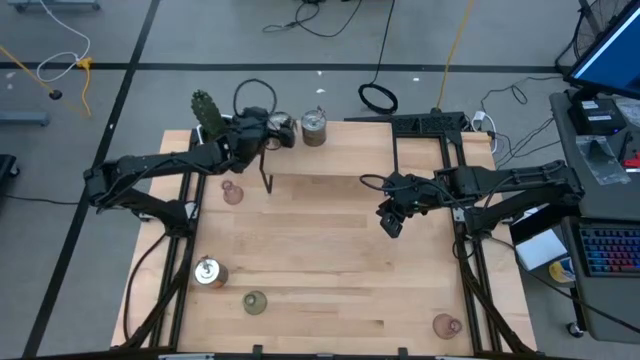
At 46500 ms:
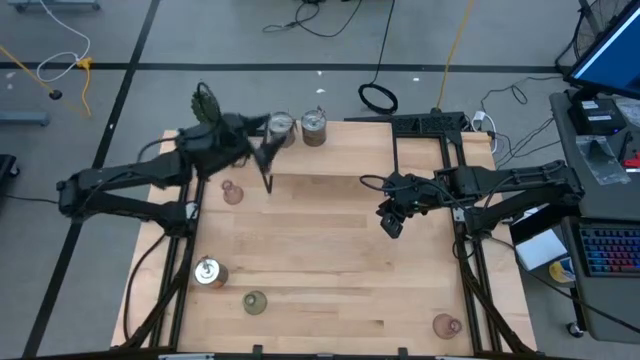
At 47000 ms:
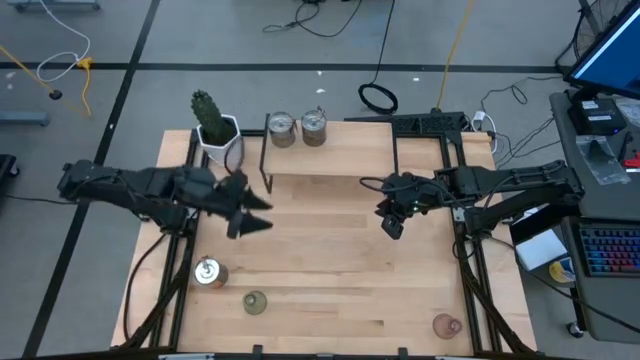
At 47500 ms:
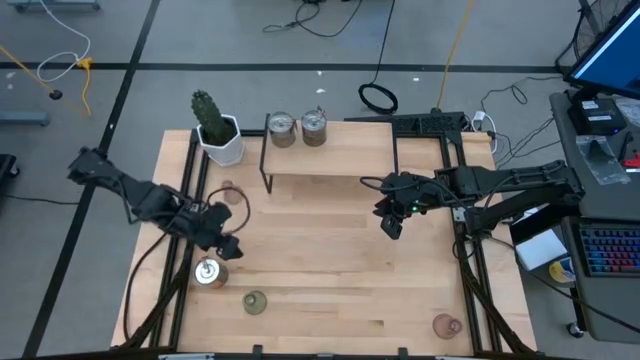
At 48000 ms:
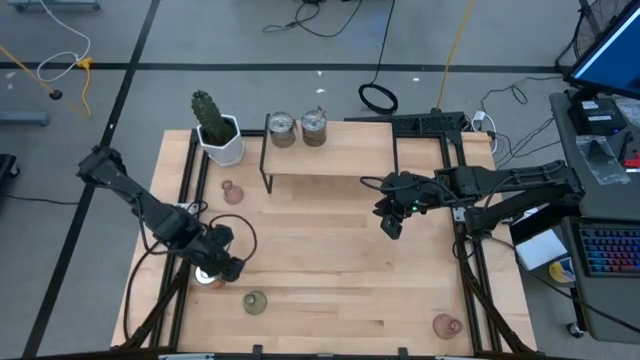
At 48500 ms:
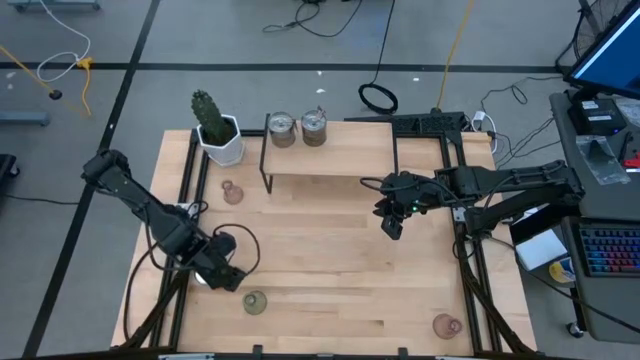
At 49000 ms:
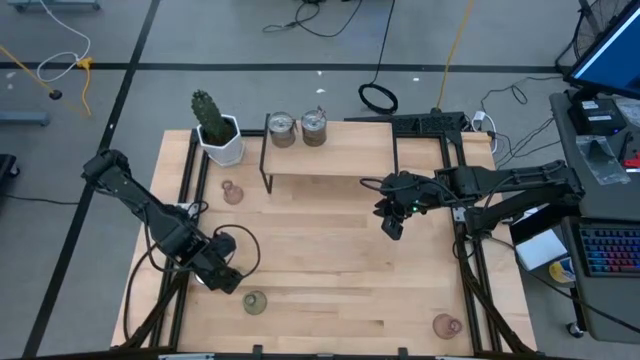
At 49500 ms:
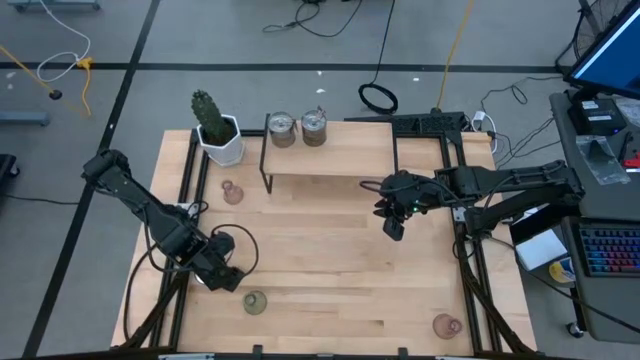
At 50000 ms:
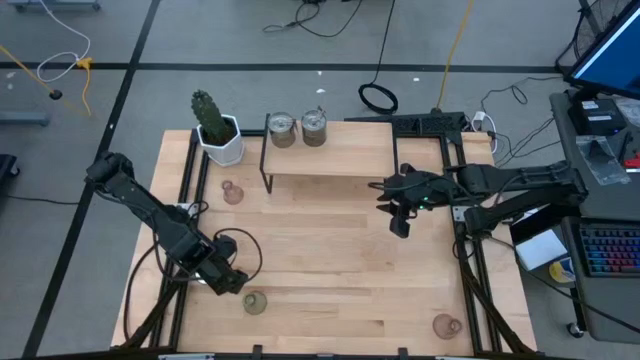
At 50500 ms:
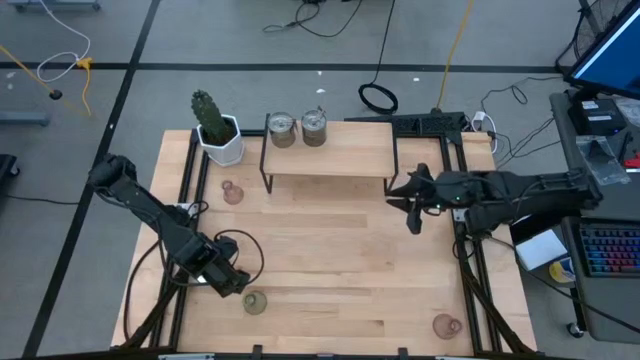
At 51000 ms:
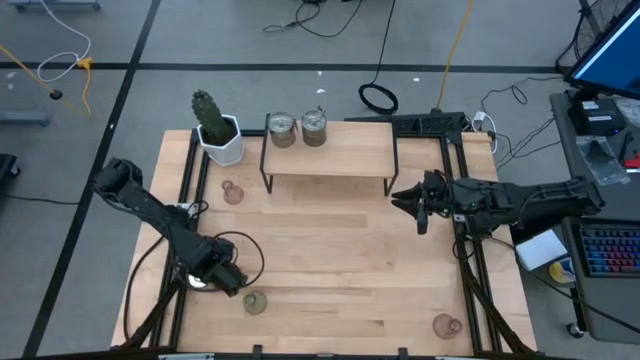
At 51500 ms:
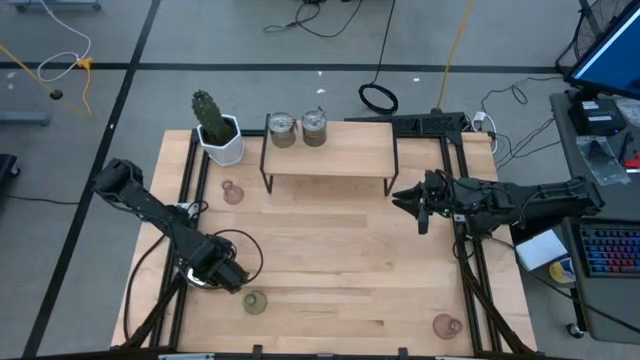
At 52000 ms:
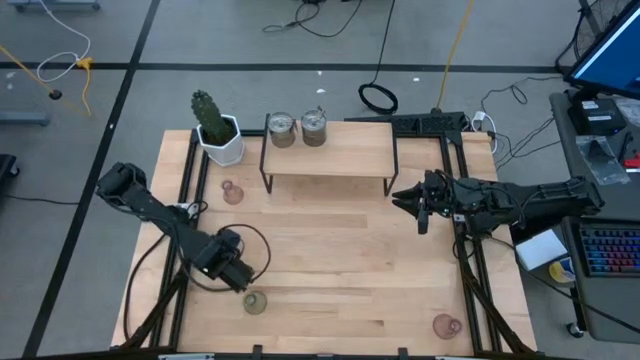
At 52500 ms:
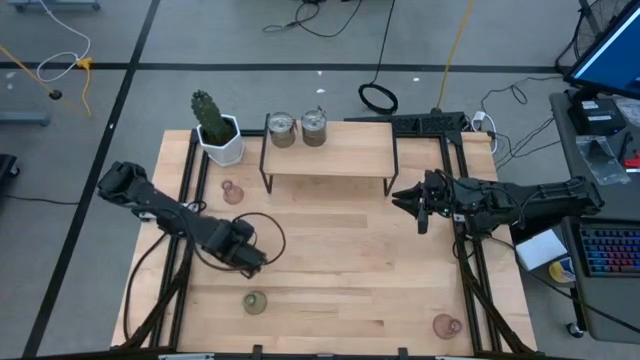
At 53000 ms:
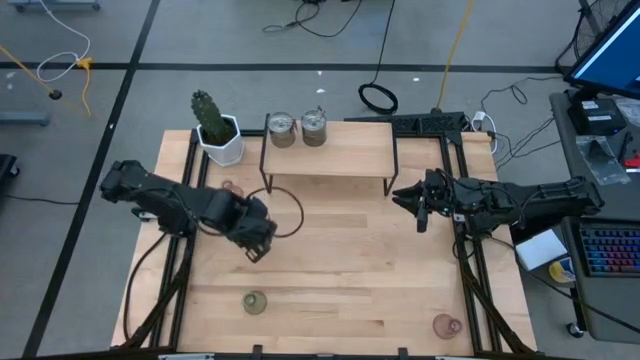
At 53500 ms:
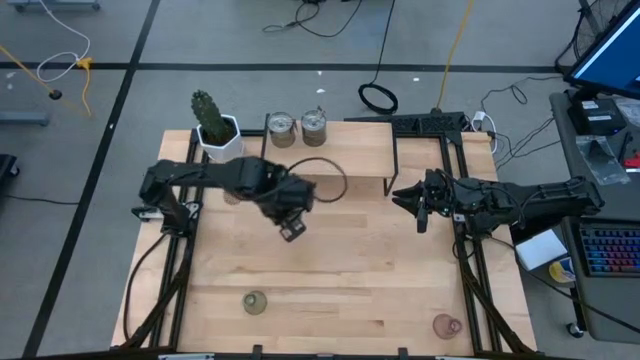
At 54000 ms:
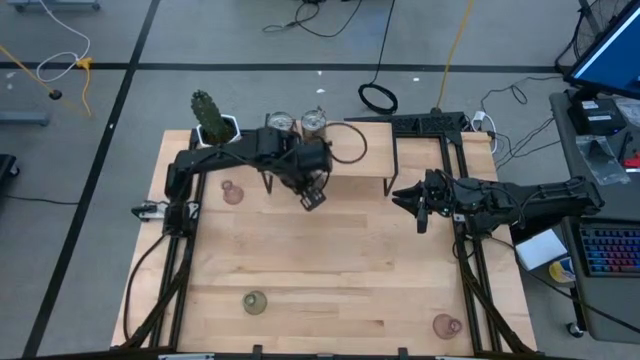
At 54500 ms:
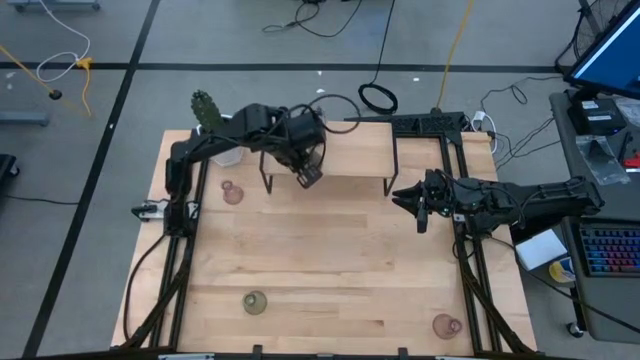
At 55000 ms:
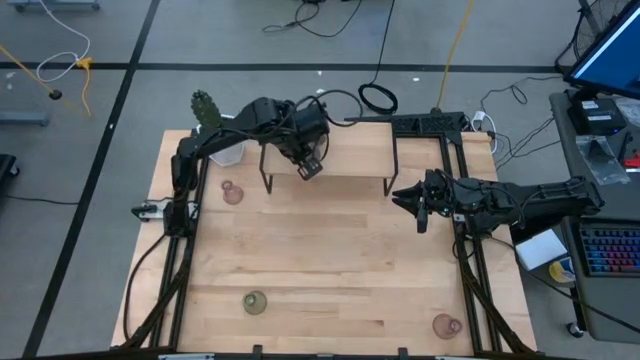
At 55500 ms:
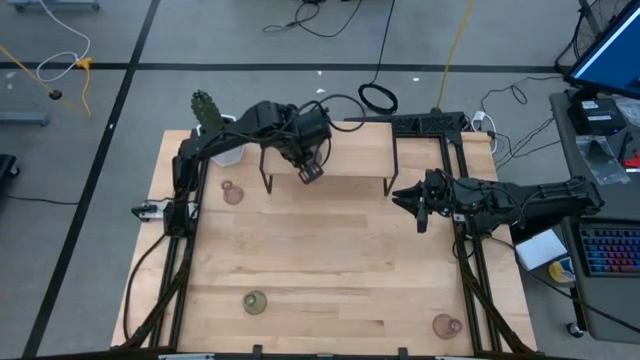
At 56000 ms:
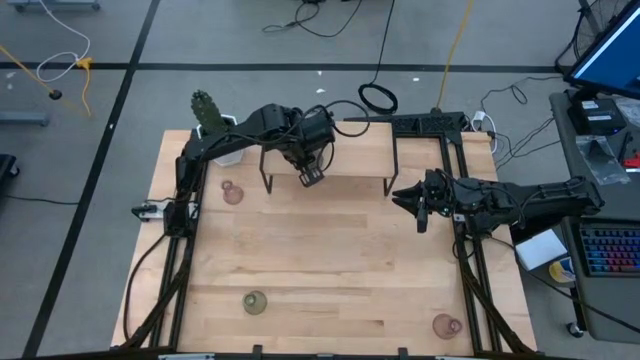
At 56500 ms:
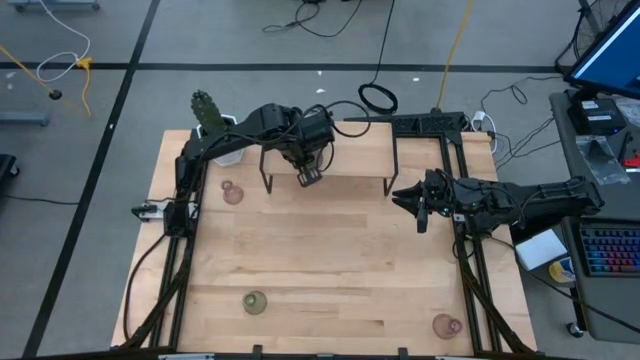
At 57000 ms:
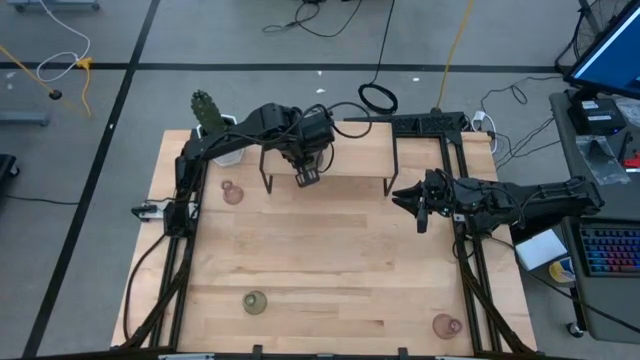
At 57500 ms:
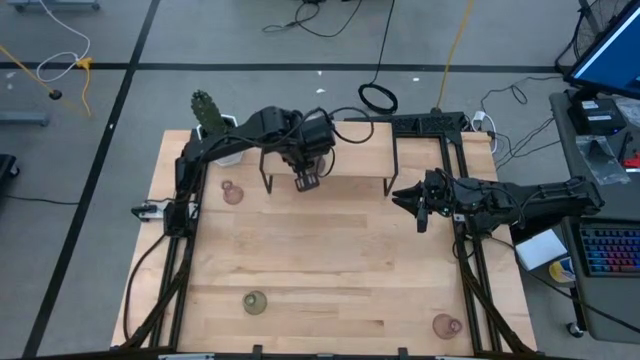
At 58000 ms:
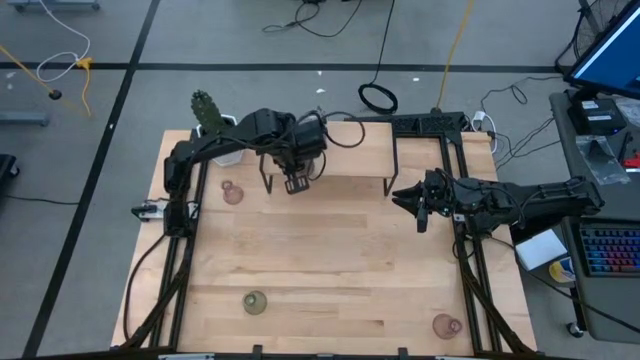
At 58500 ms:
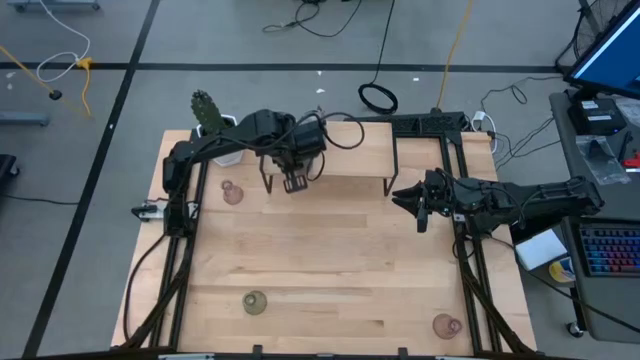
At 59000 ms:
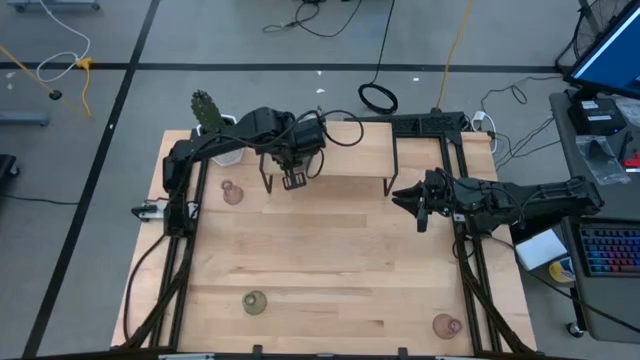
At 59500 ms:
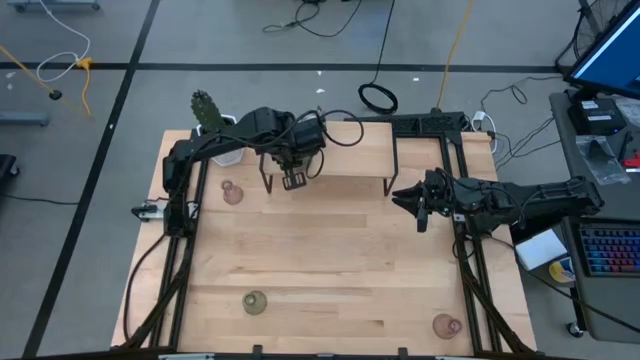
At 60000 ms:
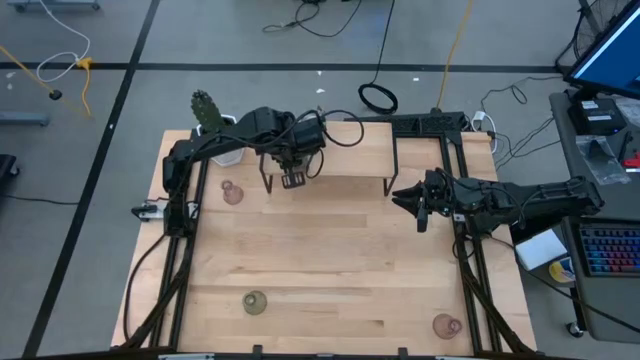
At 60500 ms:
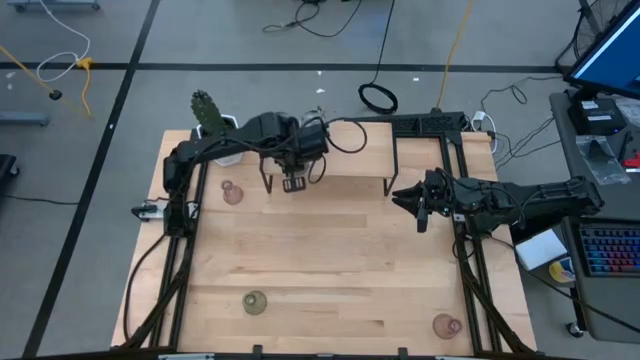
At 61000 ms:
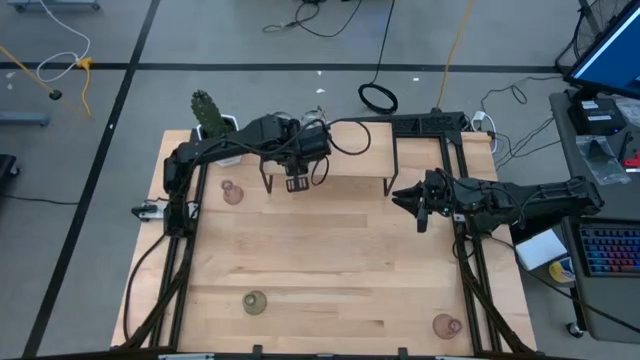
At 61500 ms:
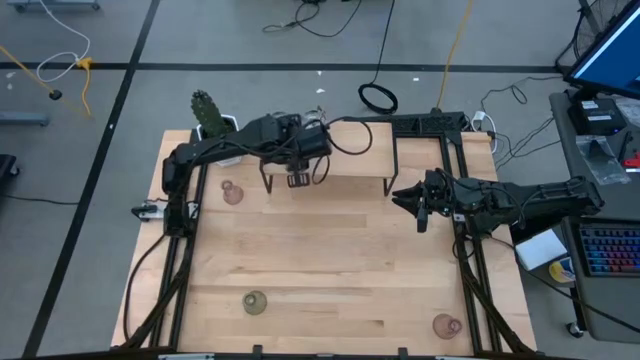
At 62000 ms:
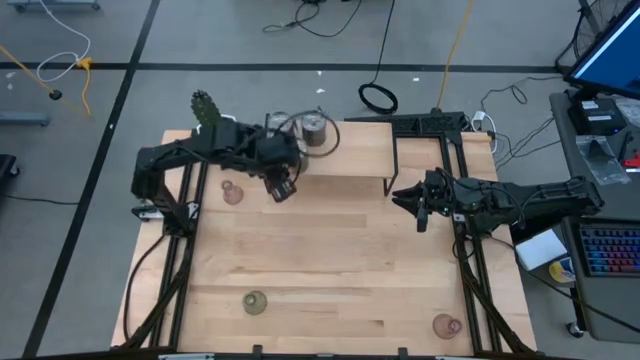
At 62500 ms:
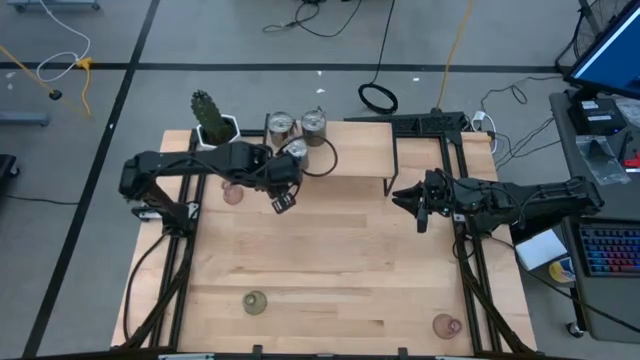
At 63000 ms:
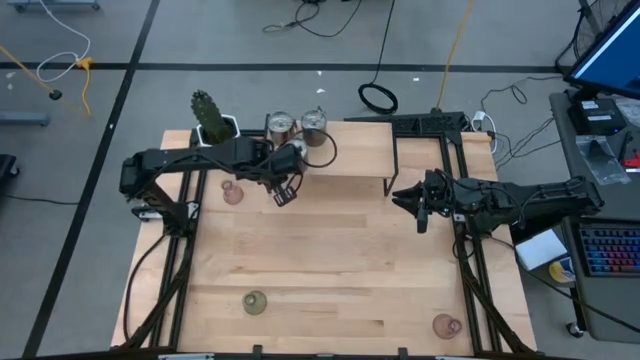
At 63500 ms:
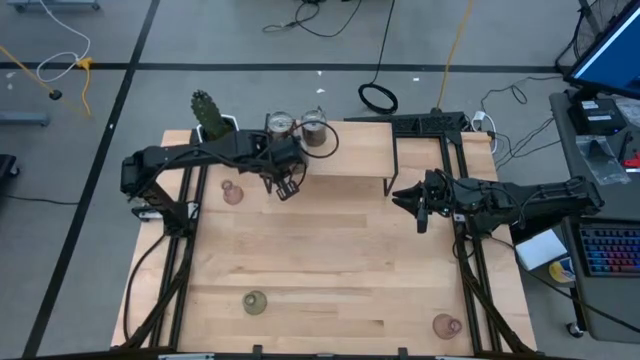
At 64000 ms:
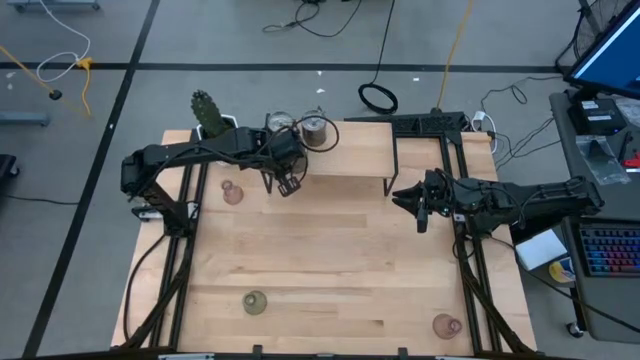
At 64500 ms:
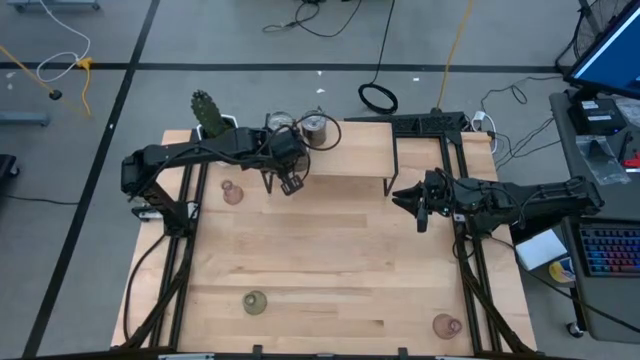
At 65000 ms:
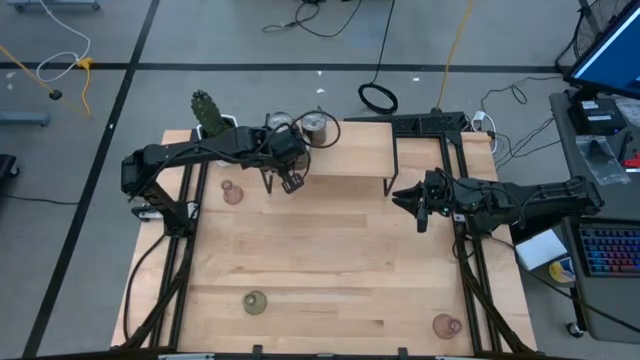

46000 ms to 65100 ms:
Task: Pick & Place candle stick holders
Put the silver scented candle on the shelf
